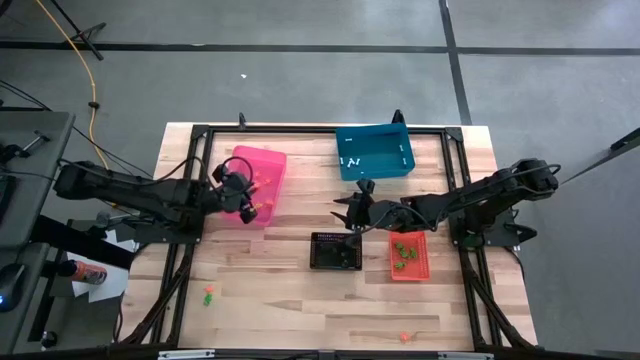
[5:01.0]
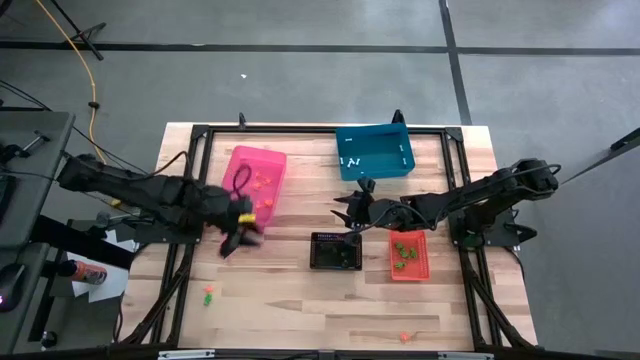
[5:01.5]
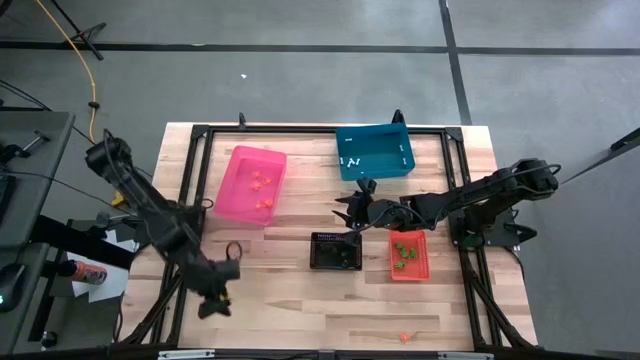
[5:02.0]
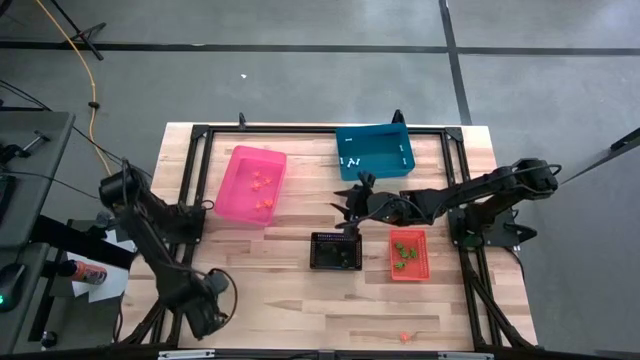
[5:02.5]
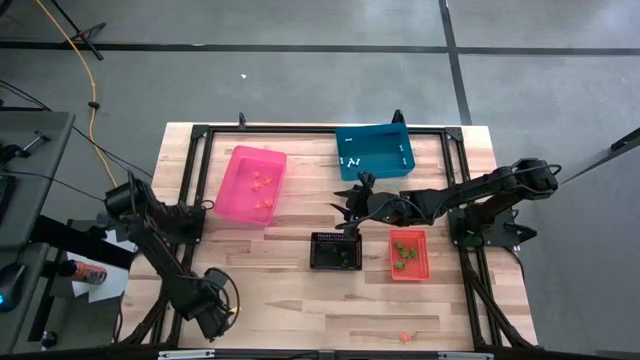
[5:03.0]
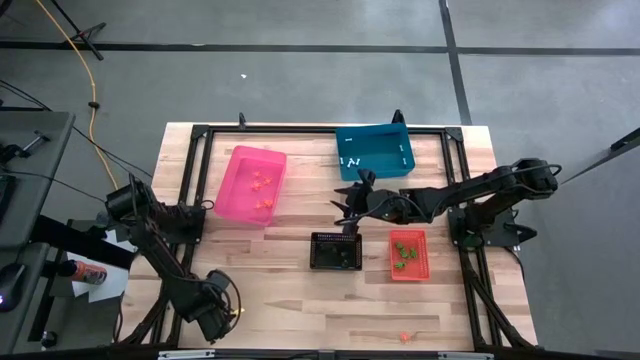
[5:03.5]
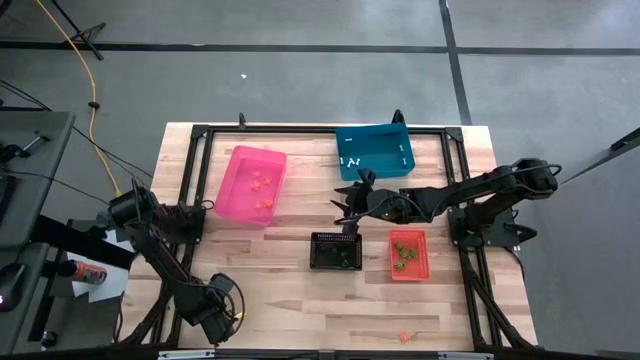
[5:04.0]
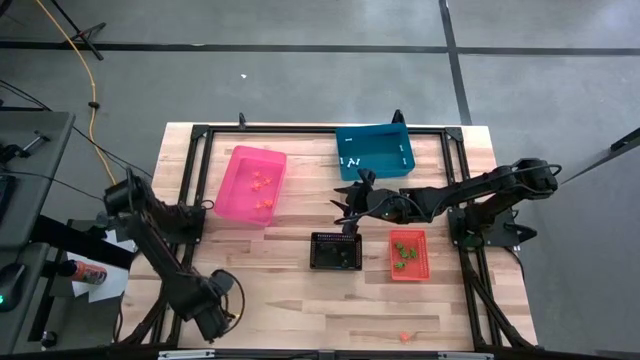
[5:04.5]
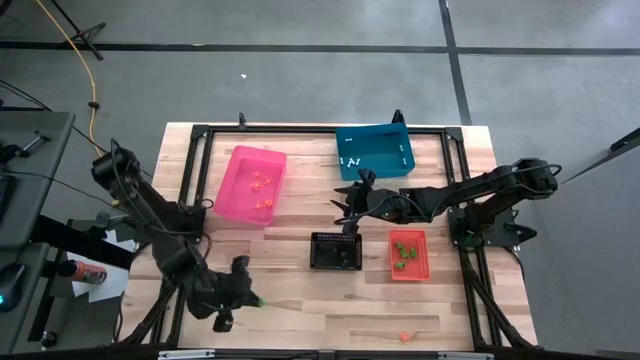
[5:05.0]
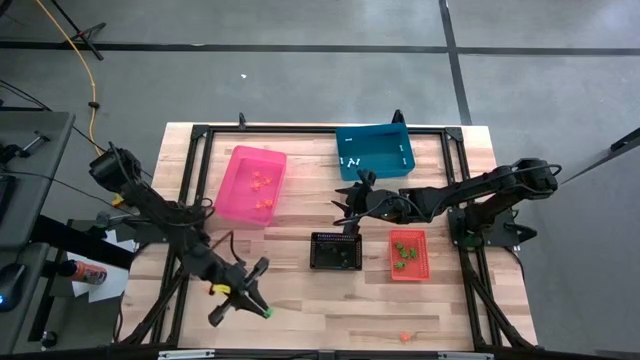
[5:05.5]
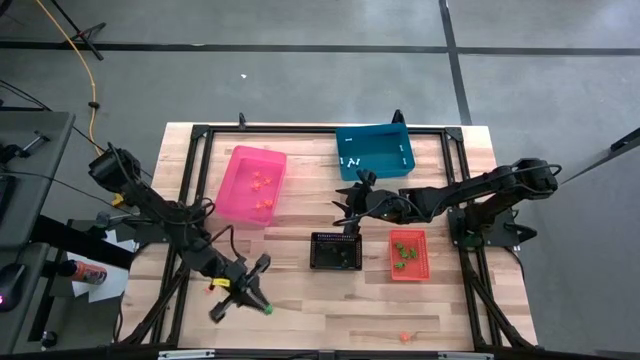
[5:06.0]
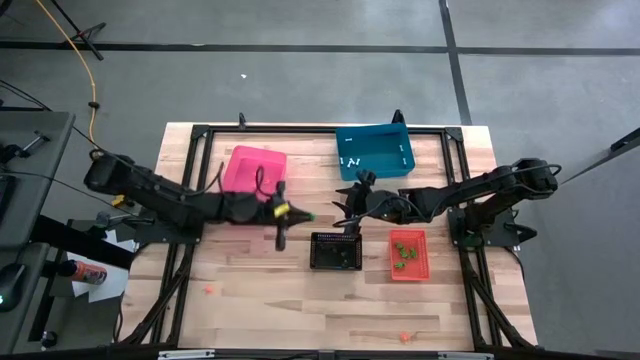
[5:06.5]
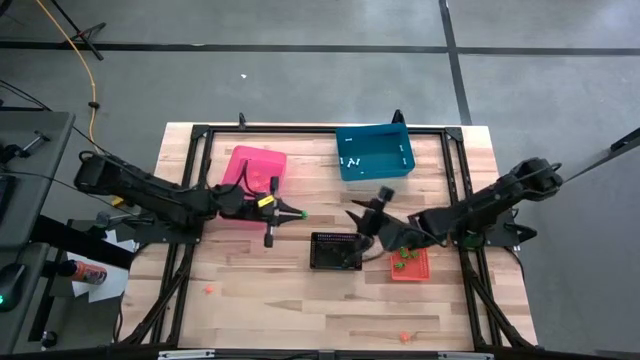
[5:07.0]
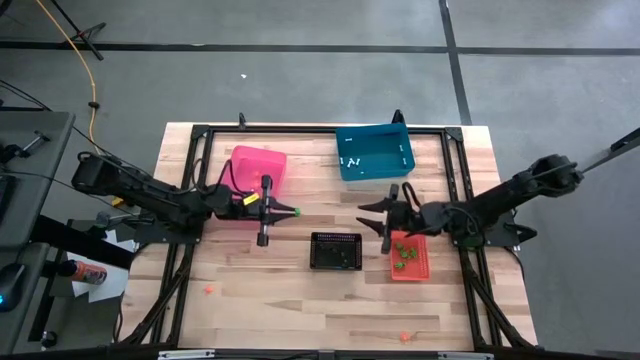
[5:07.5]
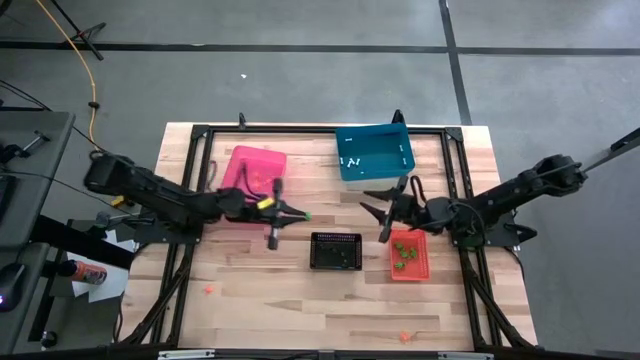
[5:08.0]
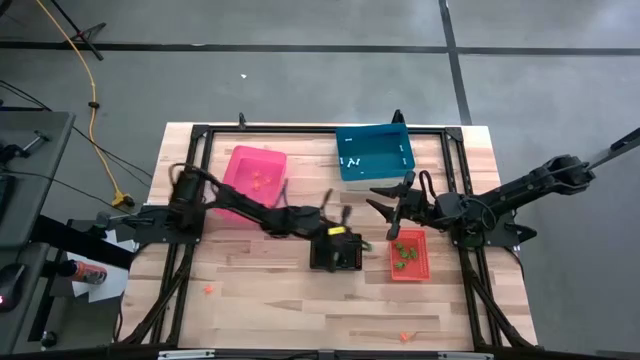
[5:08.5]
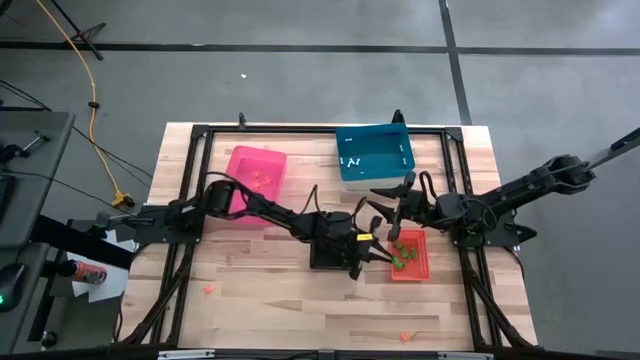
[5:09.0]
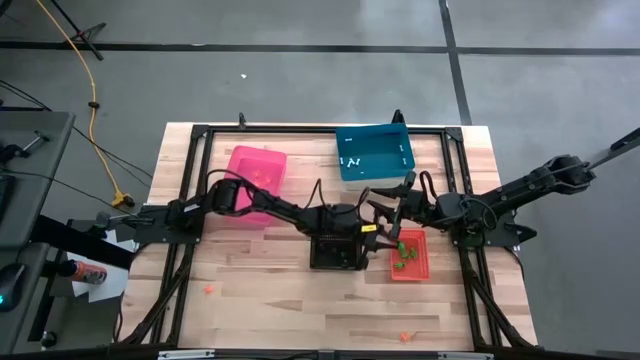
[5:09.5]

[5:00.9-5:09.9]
Task: Sort Halloween decoration
Put the green skeleton toy into the orange bin

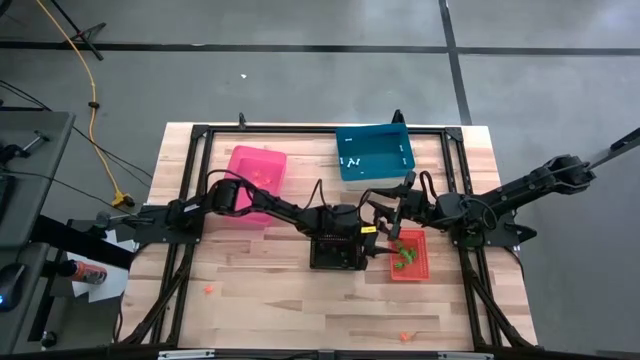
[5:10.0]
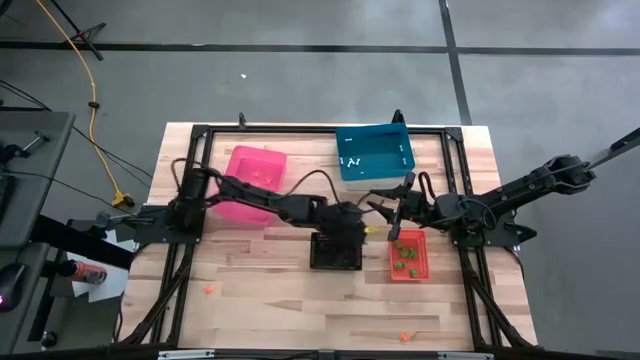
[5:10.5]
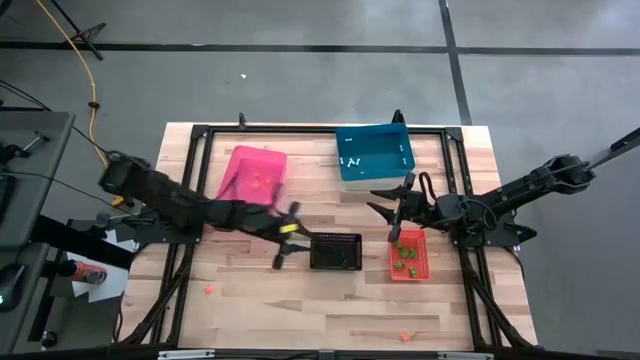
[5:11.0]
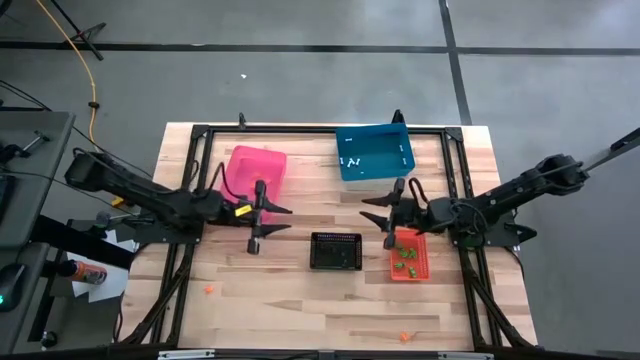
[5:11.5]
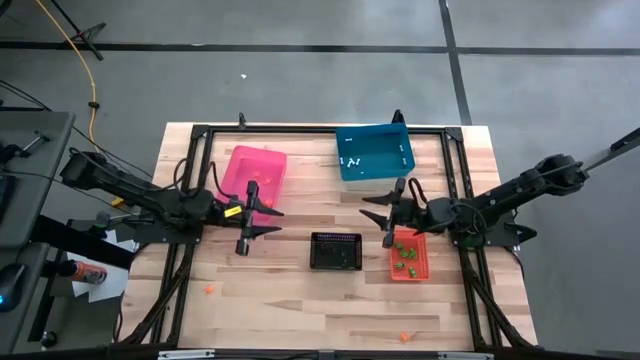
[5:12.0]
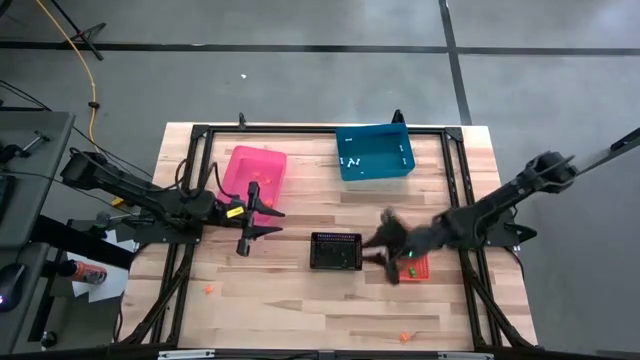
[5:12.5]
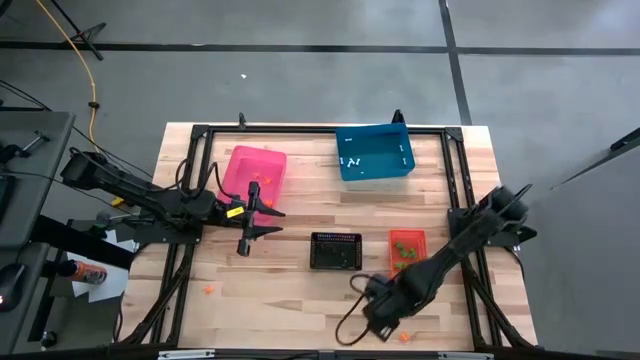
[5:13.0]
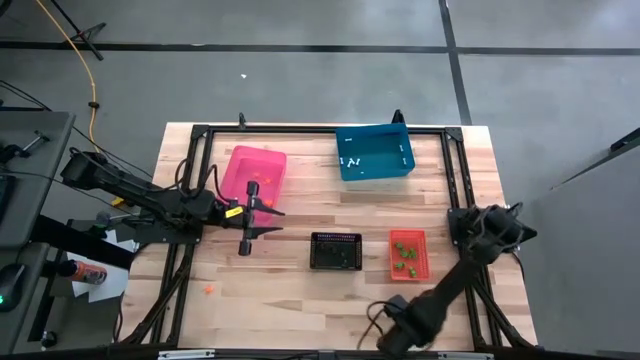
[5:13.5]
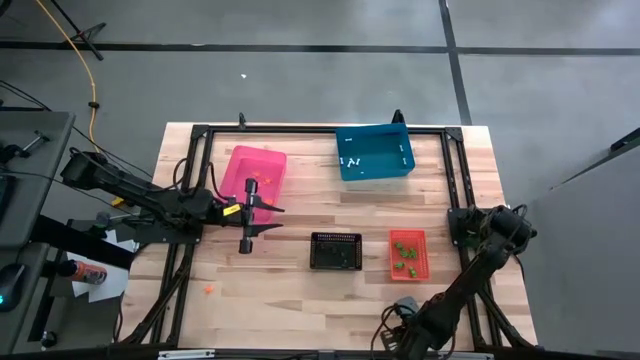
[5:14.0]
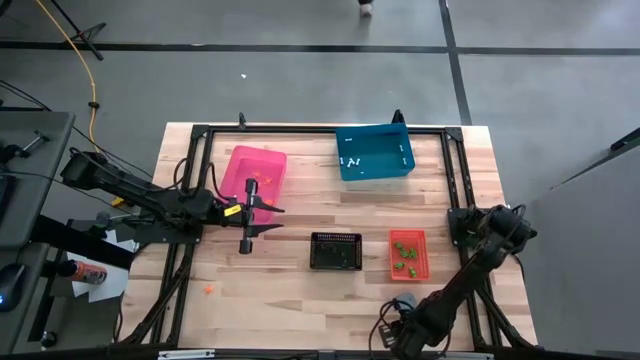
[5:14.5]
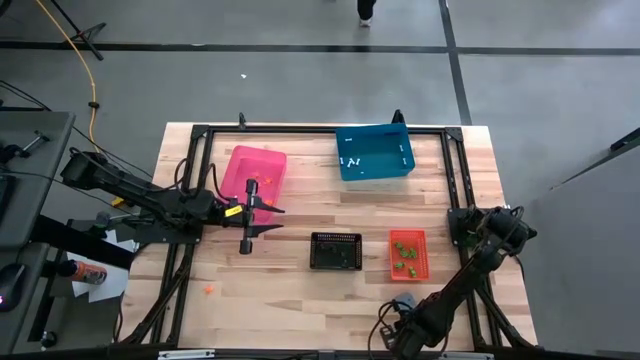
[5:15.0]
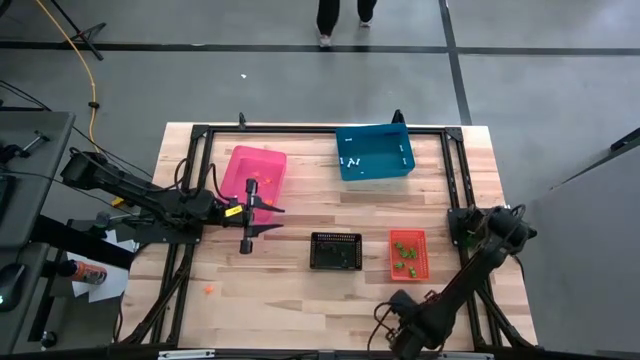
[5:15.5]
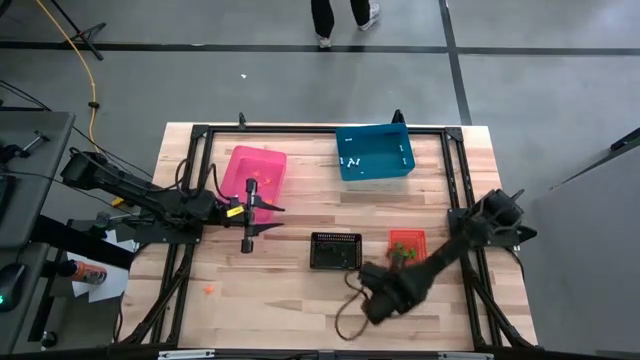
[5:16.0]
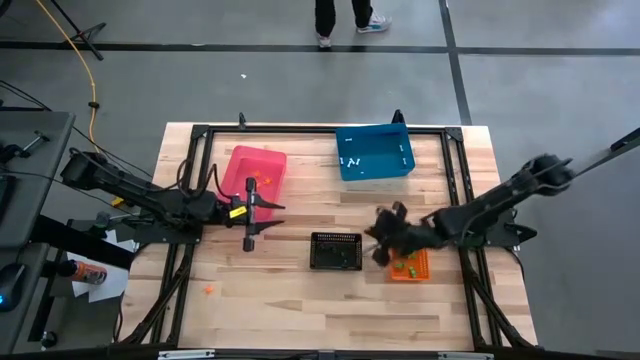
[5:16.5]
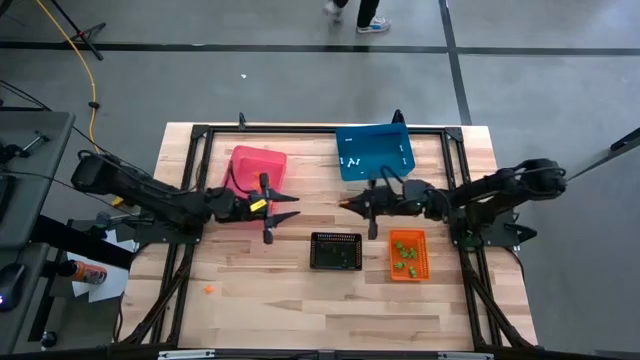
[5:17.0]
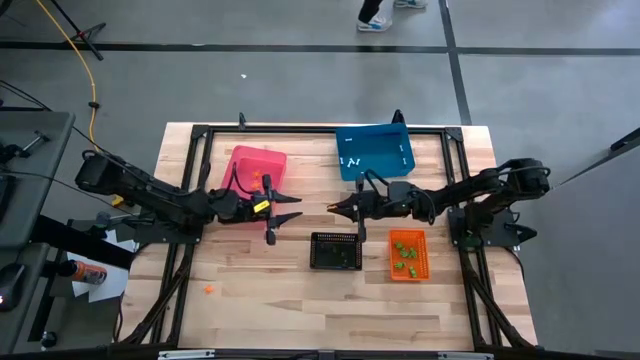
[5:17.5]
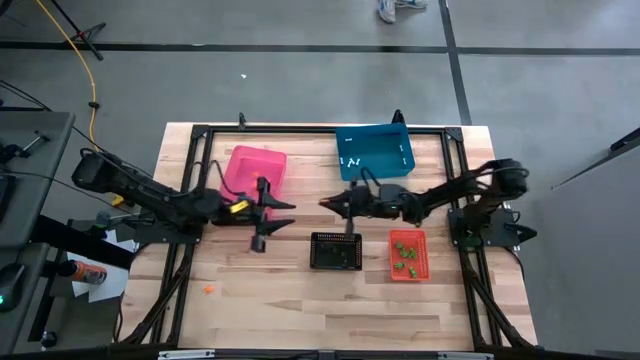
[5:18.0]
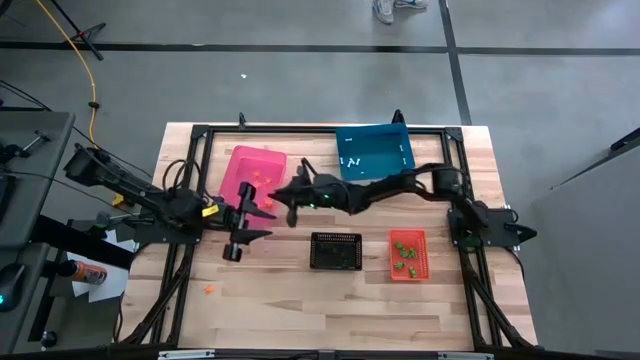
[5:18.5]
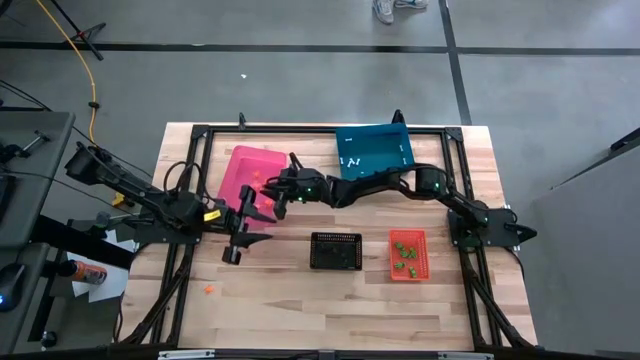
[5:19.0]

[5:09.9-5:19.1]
Put the orange spider toy into the pink bin

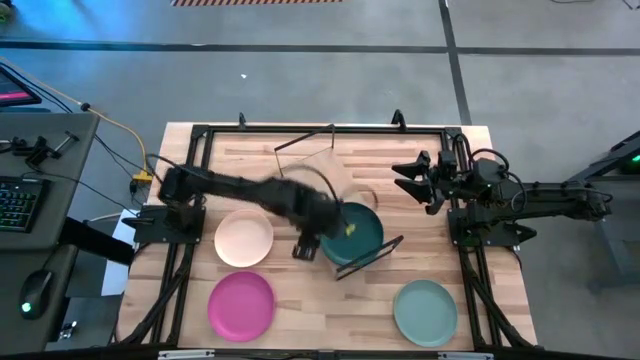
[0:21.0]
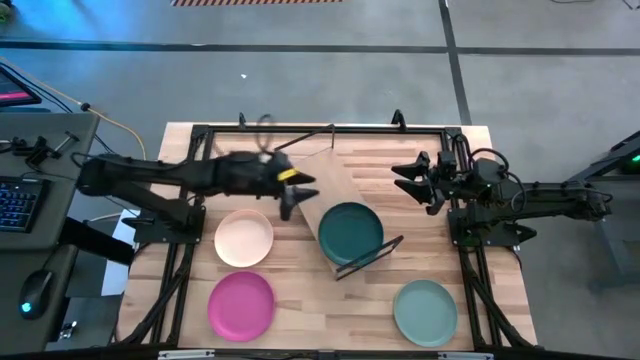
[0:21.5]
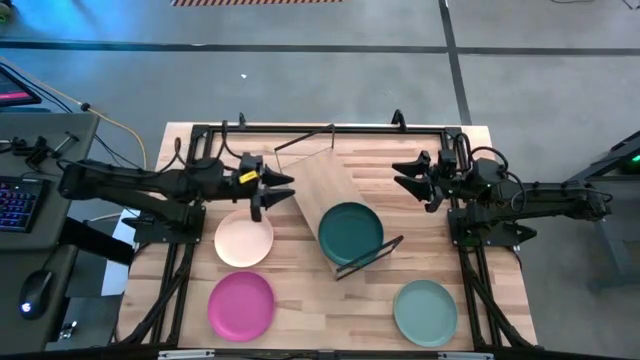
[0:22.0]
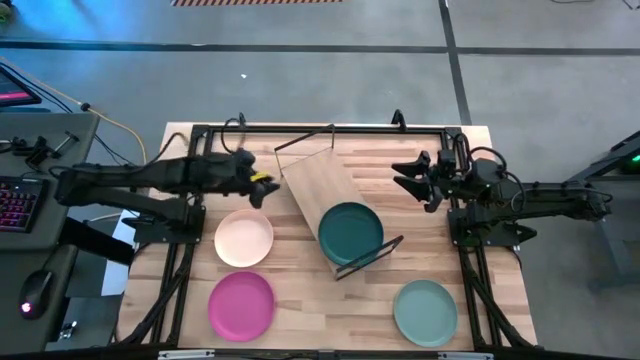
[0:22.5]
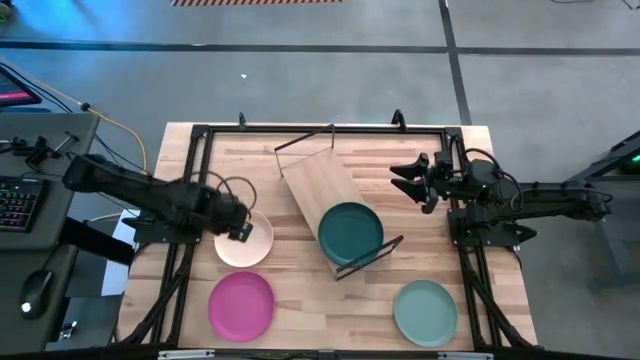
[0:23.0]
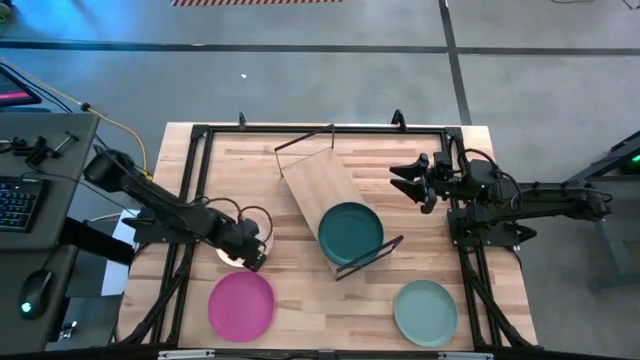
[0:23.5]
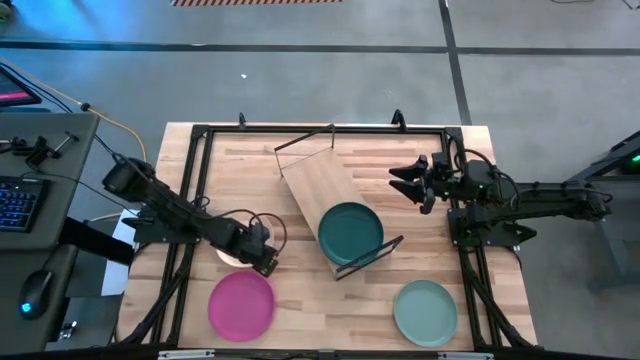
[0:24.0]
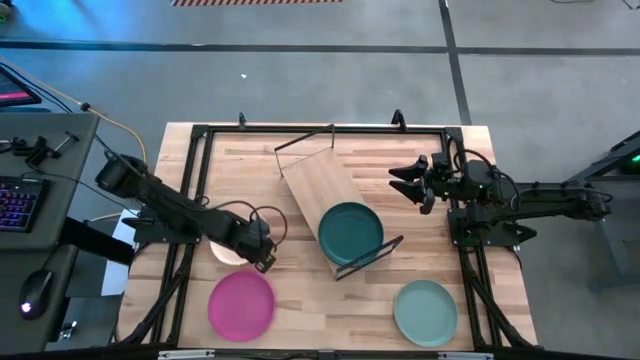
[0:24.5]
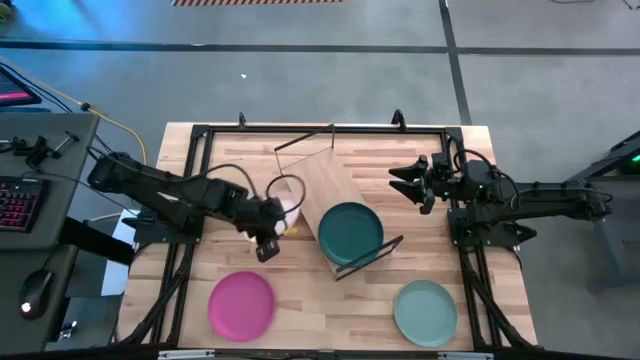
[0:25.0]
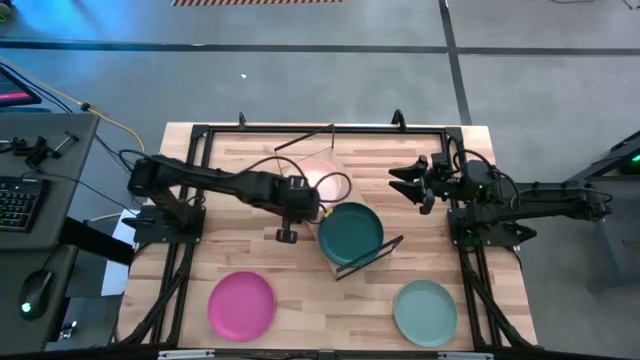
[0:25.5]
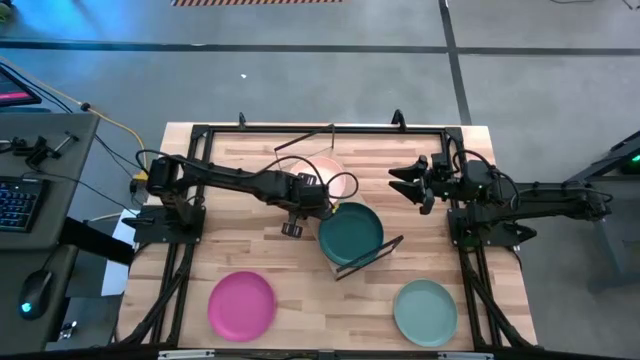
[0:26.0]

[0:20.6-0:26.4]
Task: Place and stack plates onto a shelf
Put the the light brown plate on the shelf
